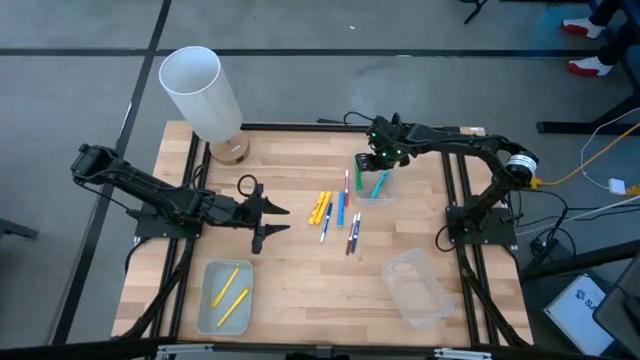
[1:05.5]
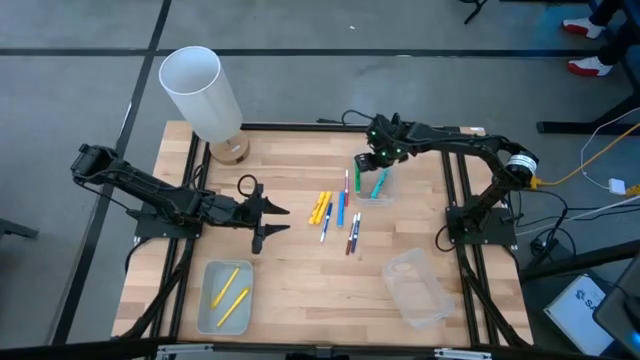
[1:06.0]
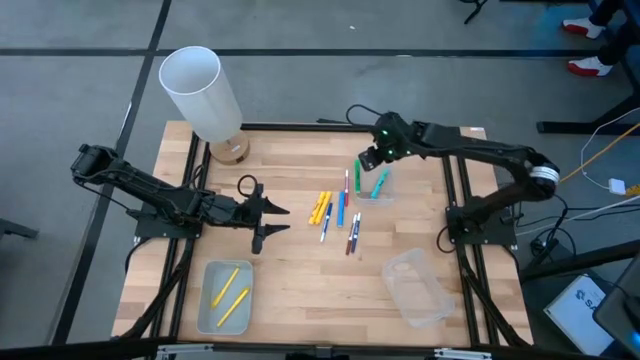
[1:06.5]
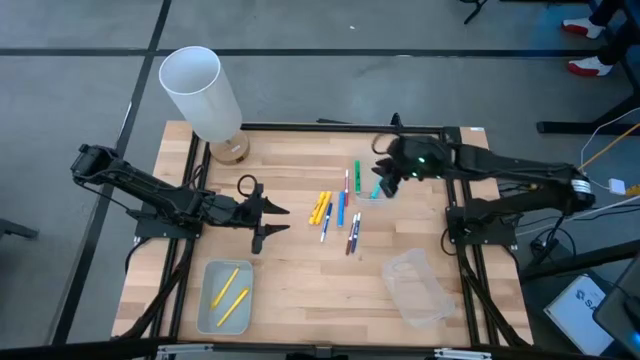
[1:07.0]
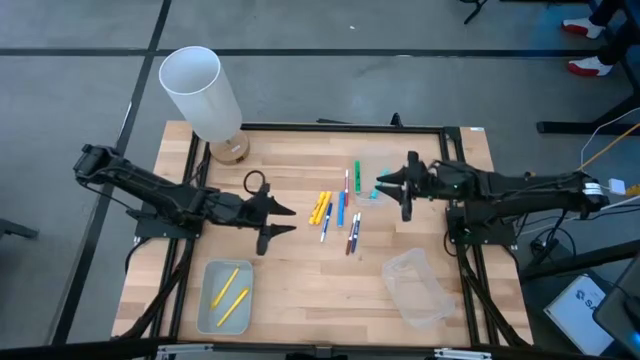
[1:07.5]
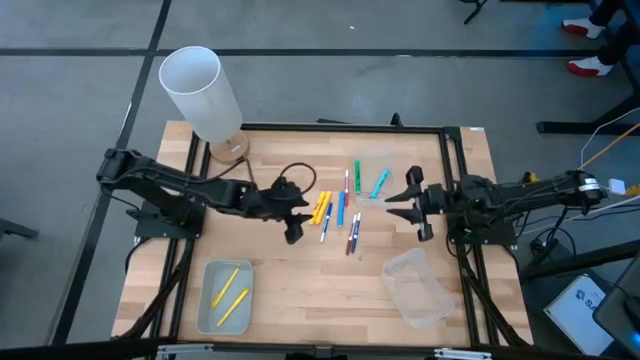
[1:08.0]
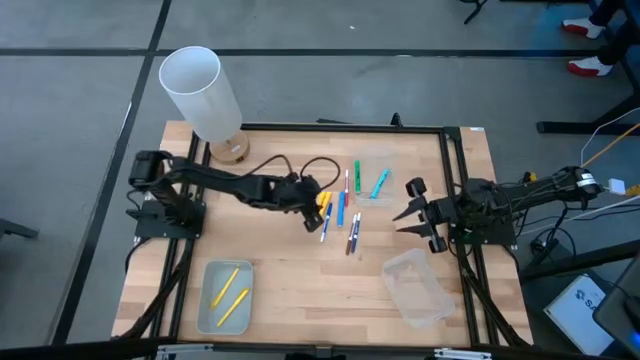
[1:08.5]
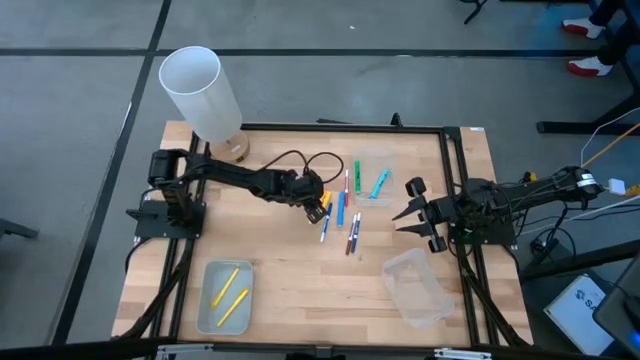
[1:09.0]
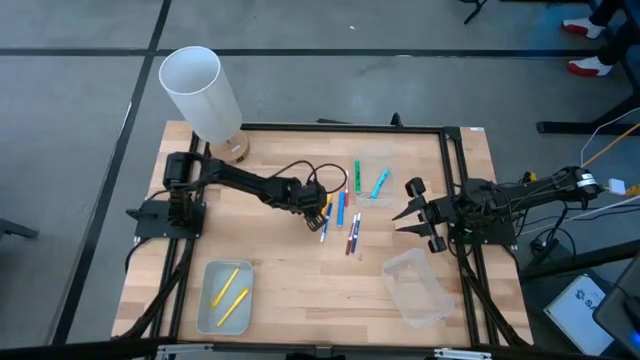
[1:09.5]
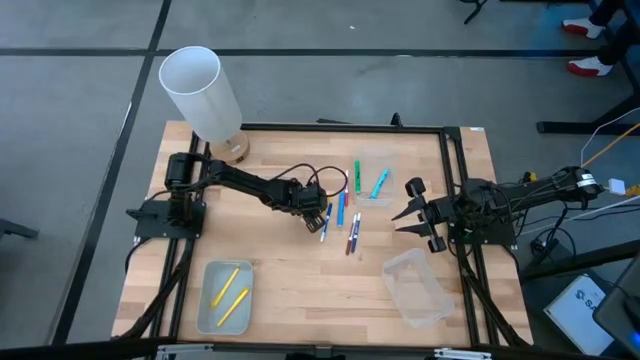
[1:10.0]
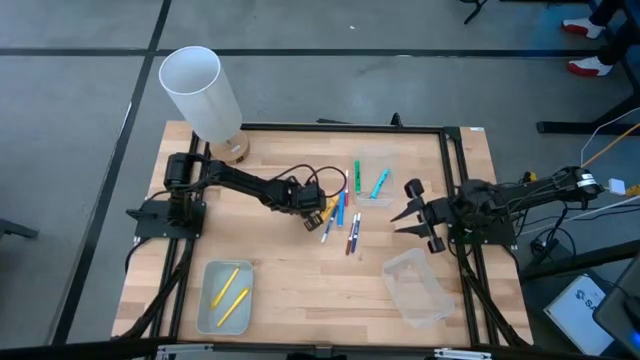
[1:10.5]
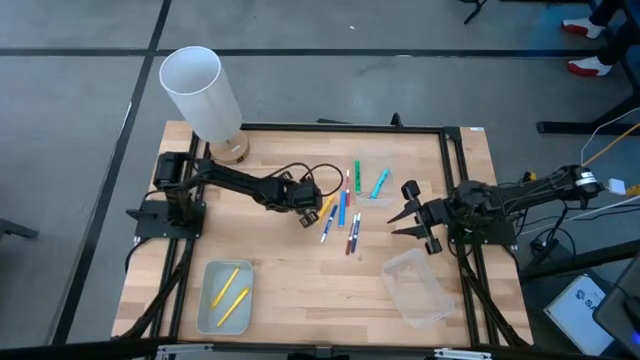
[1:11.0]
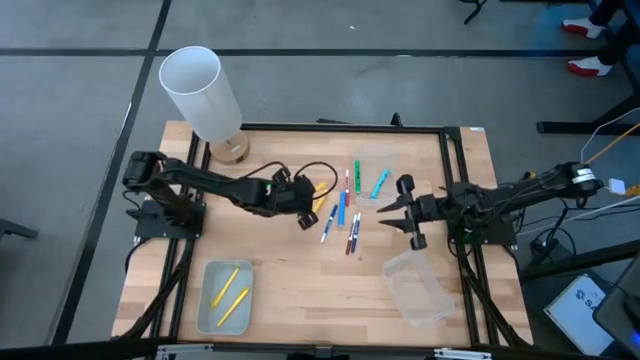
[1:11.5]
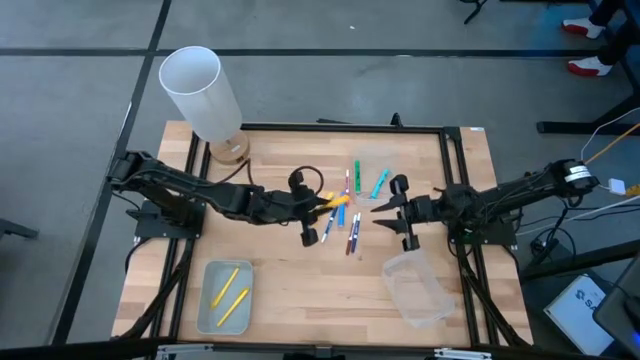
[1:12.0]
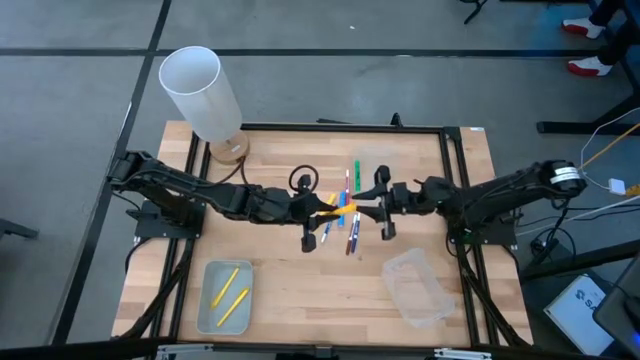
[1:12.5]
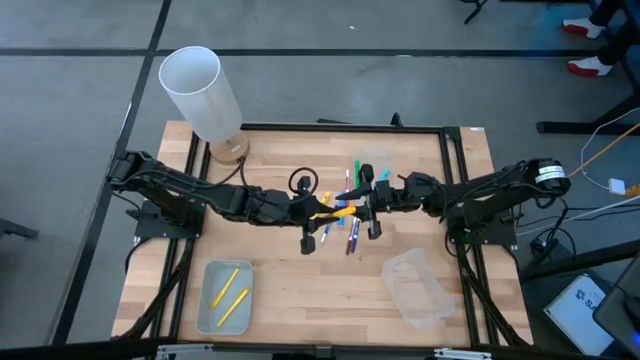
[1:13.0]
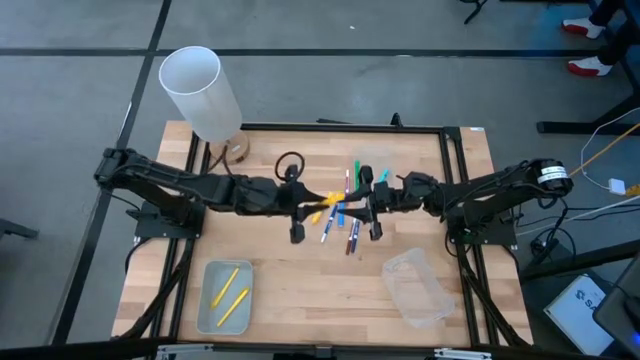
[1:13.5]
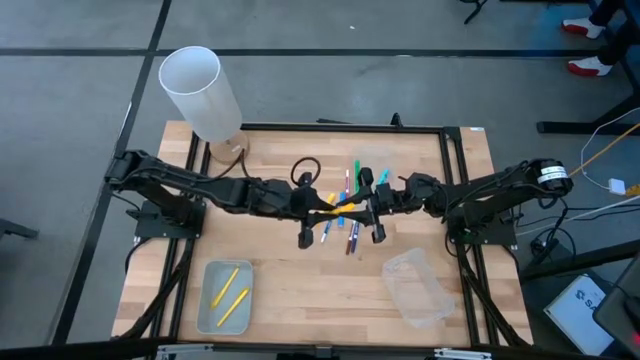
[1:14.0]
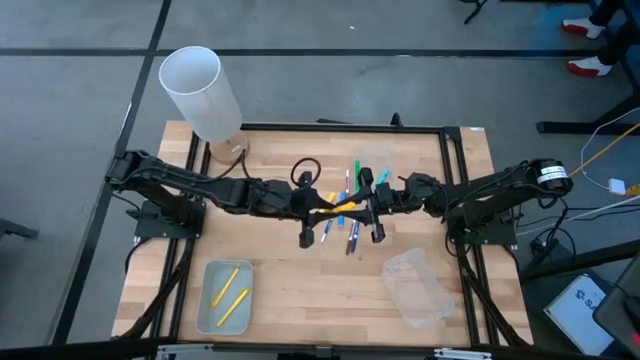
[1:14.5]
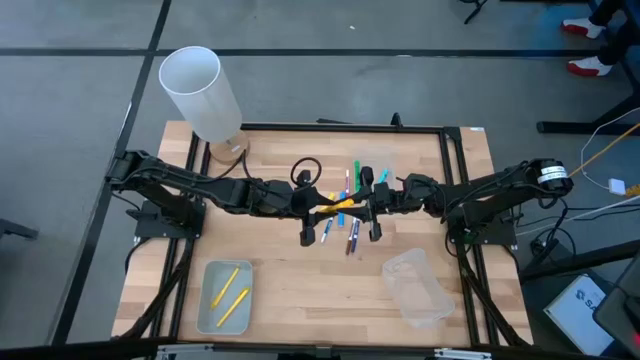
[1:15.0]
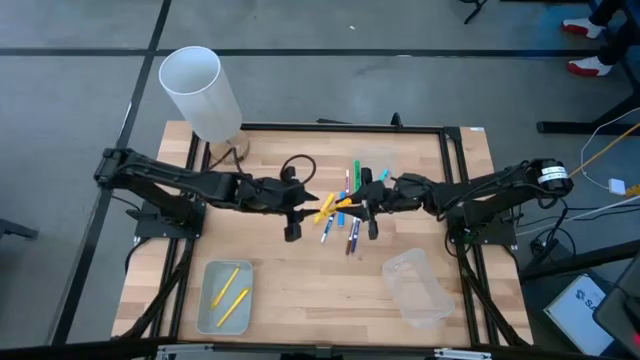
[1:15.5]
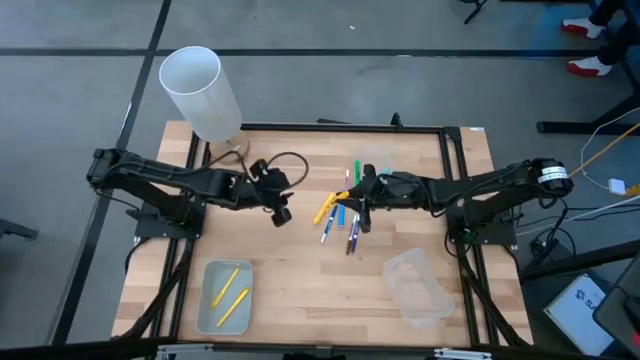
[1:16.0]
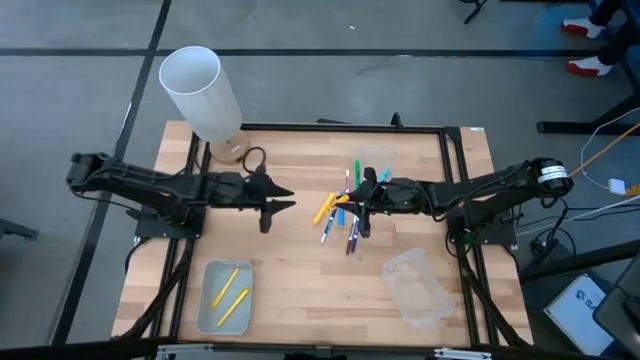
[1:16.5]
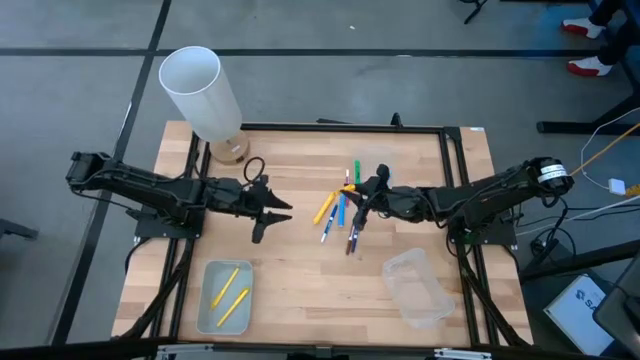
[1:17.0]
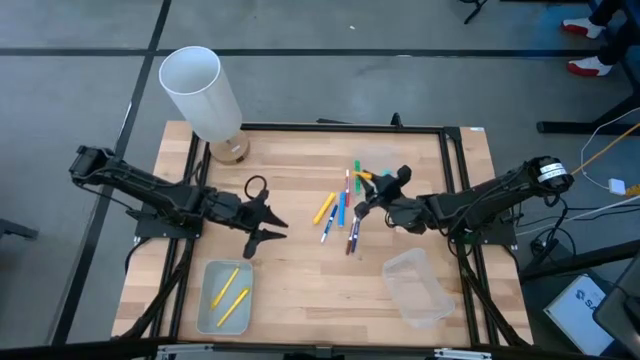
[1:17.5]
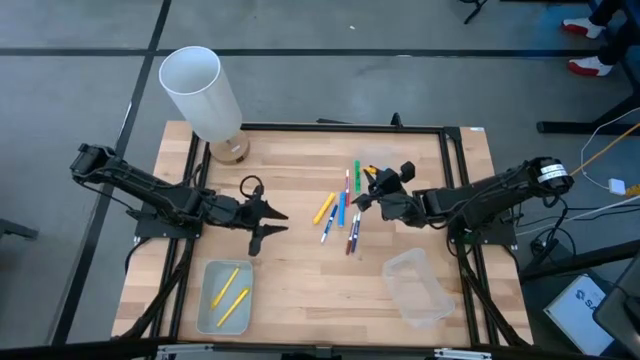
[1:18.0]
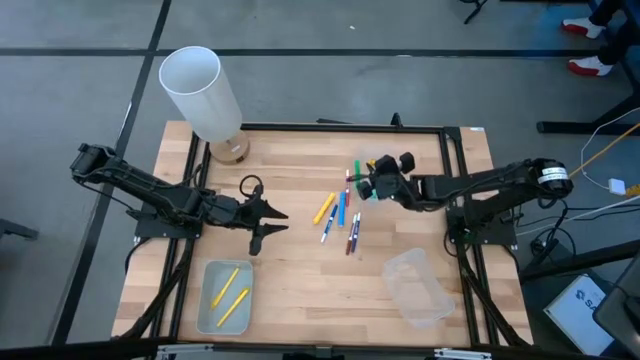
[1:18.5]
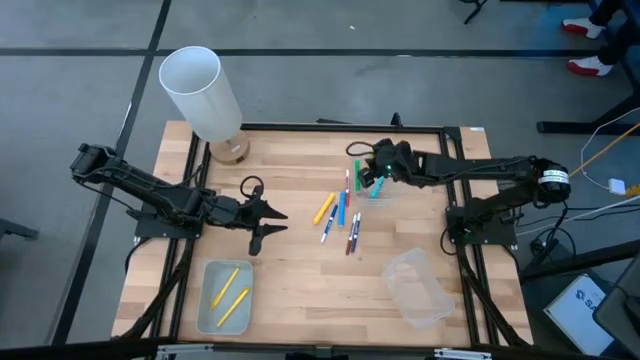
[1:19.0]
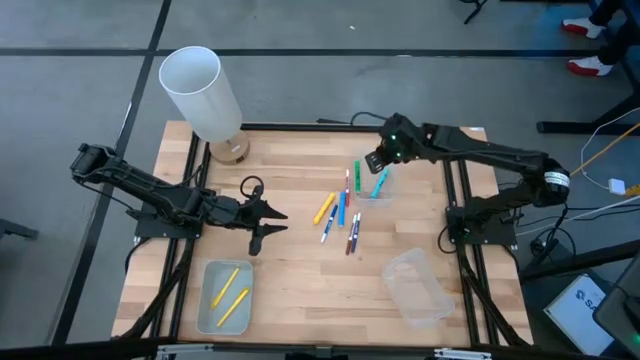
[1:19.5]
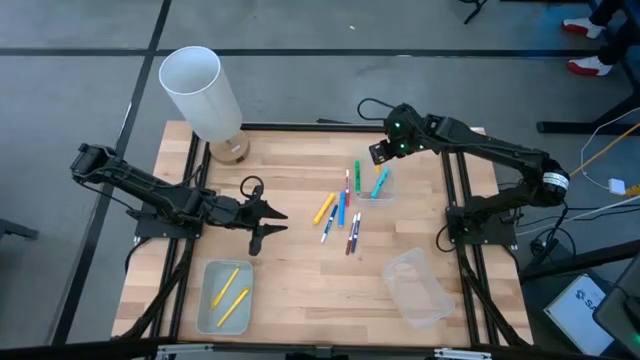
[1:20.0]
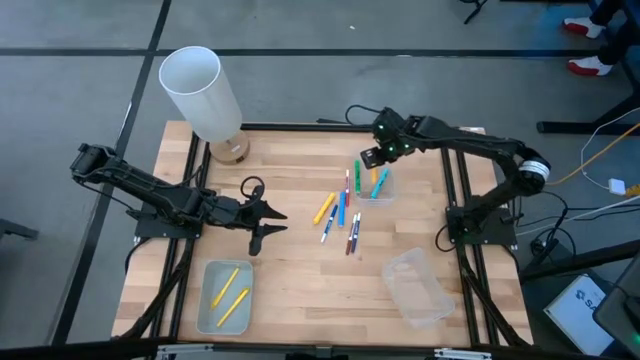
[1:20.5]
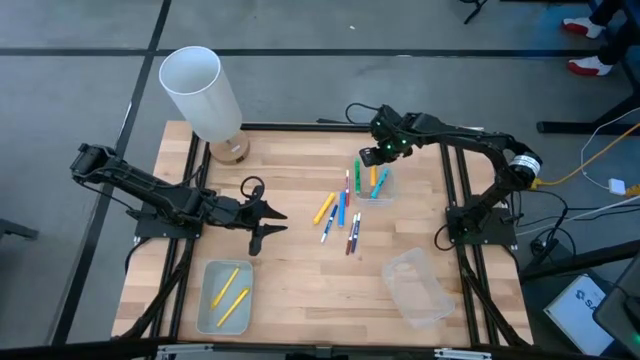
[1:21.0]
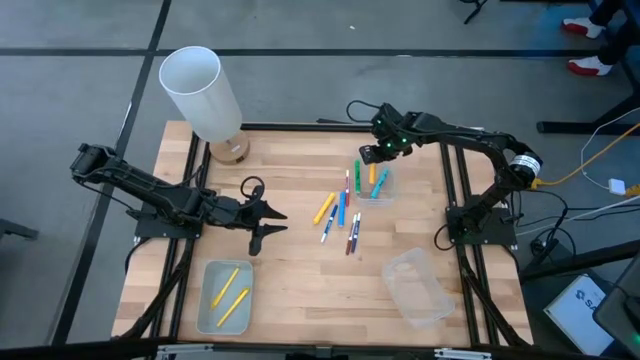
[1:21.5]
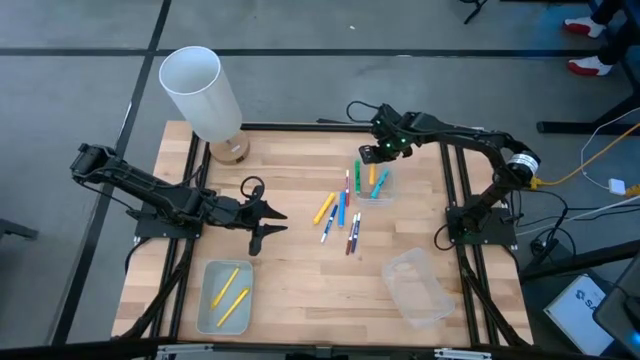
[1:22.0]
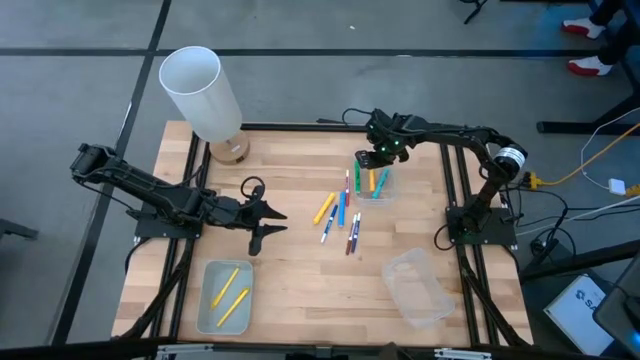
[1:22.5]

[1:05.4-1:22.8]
Task: Pick & Place Markers
Put the left yellow highlighter pen into the top transparent bin

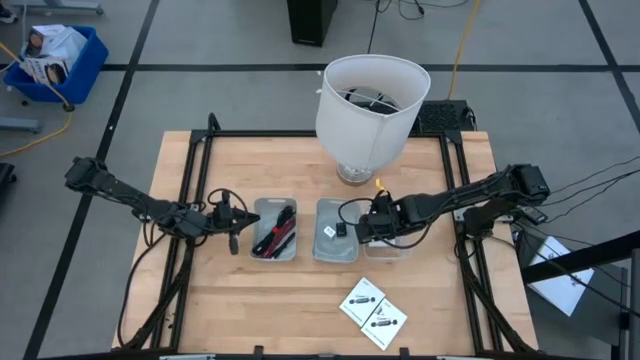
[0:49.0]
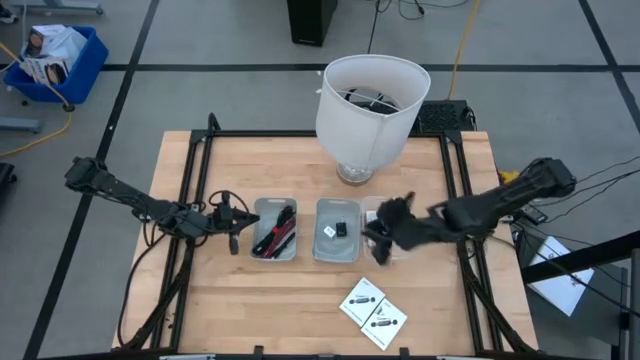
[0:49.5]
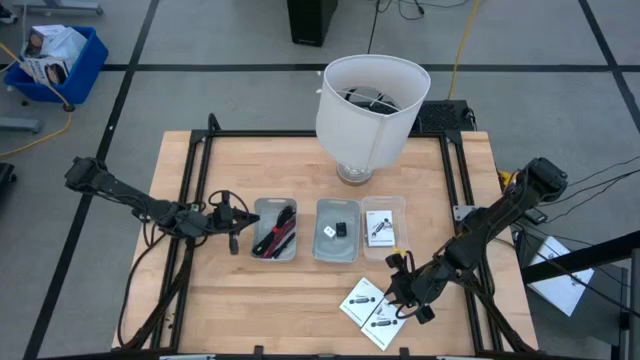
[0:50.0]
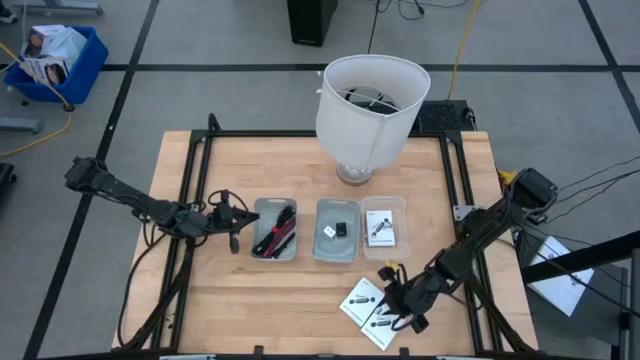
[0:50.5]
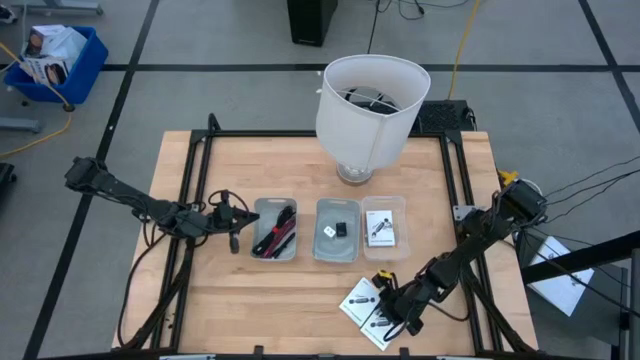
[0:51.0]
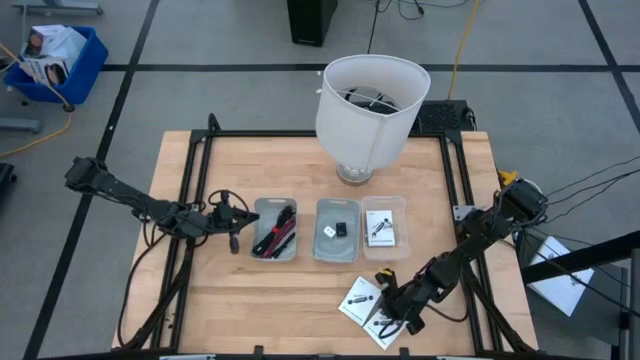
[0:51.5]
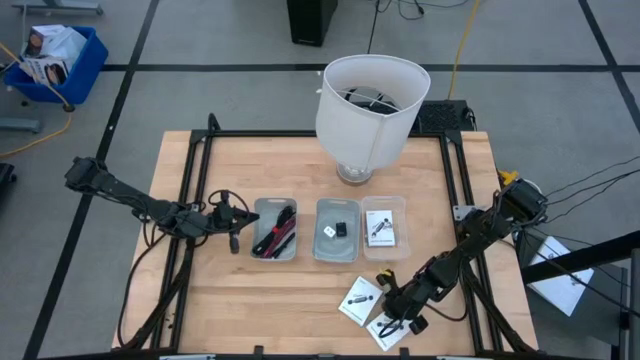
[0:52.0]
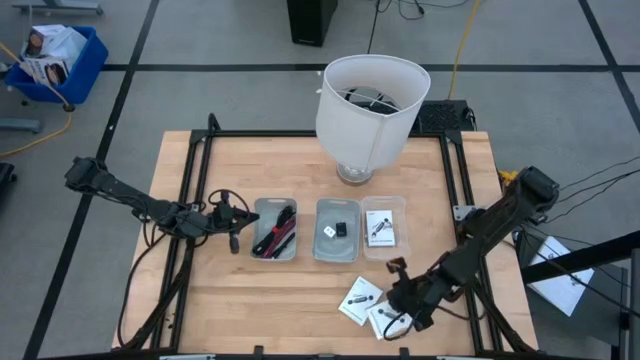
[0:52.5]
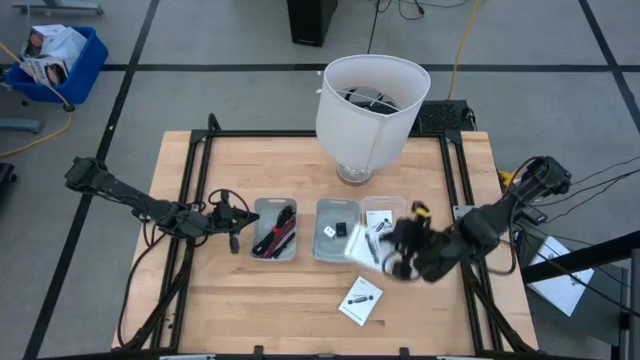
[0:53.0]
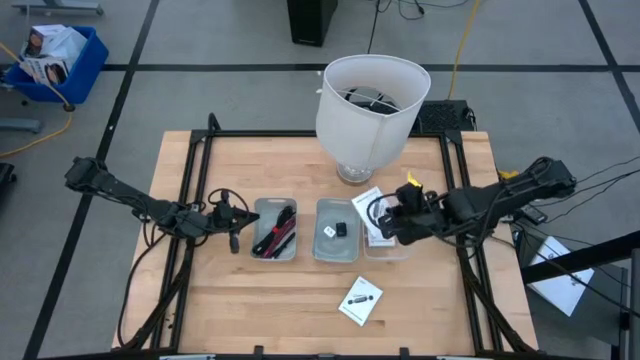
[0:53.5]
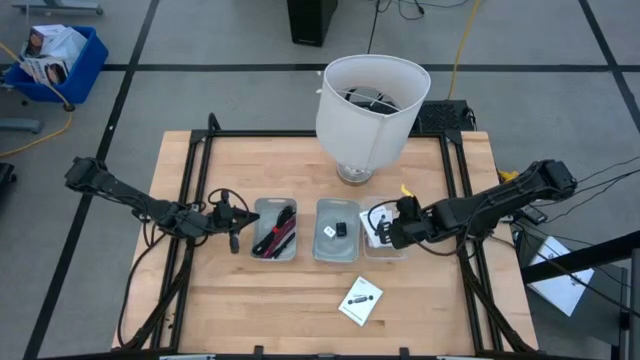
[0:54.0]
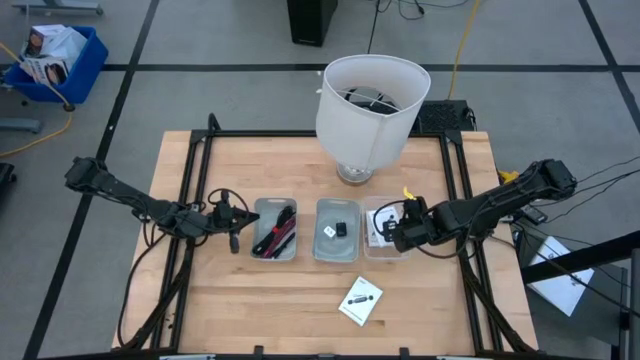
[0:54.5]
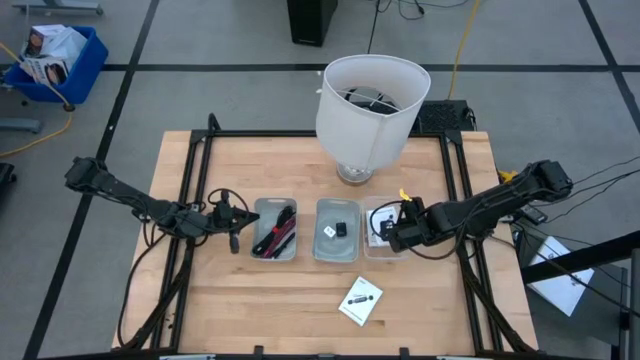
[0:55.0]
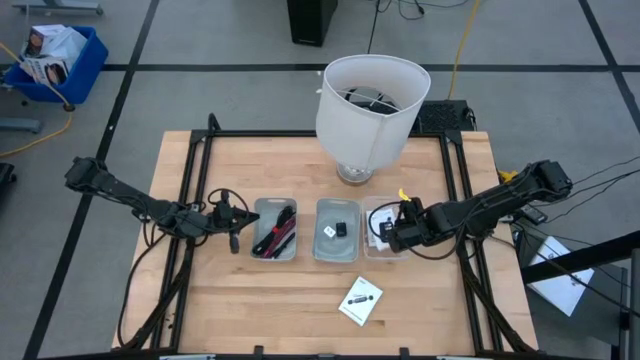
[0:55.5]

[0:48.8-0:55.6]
Task: Pick and place items into bin
Put the bottom white card reader box into the transparent bin
